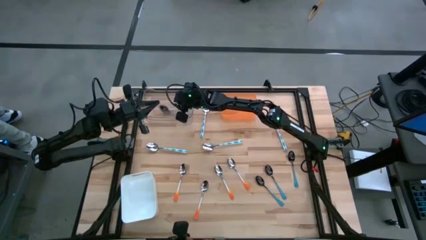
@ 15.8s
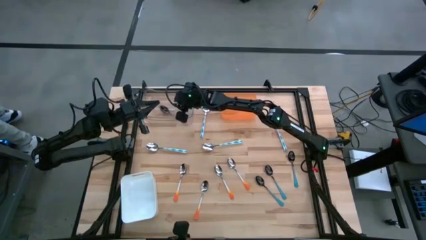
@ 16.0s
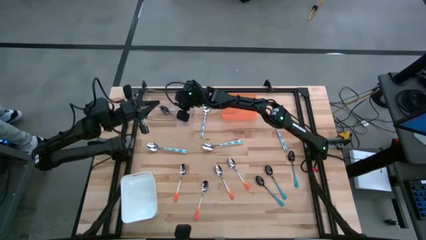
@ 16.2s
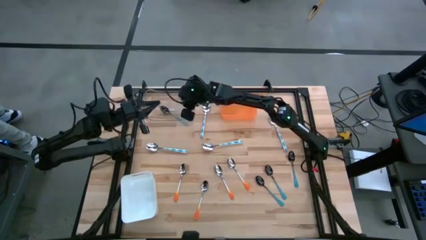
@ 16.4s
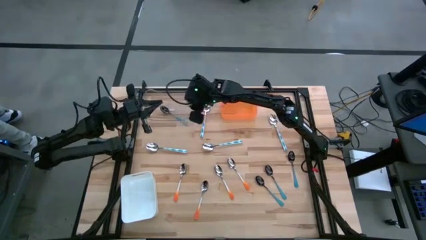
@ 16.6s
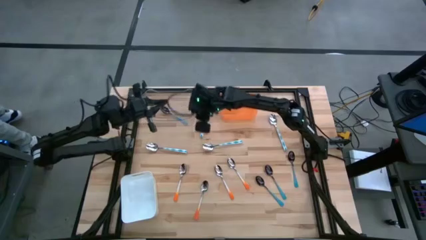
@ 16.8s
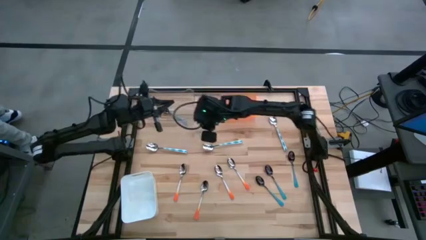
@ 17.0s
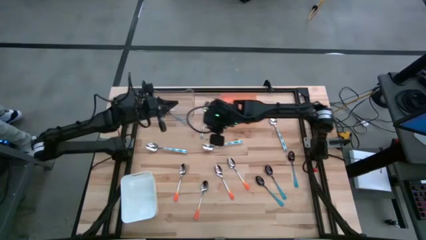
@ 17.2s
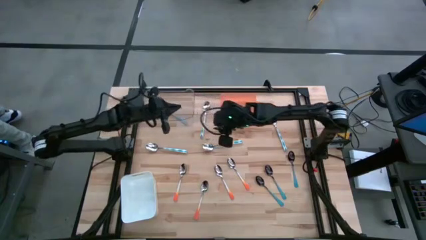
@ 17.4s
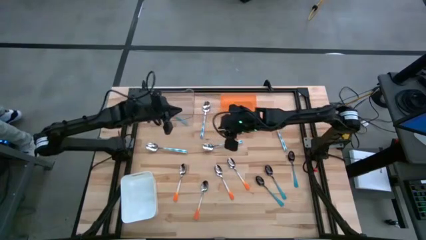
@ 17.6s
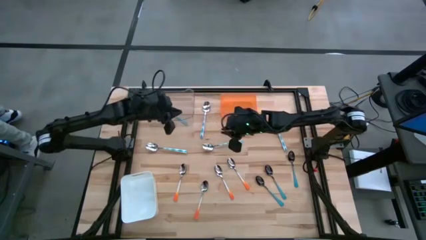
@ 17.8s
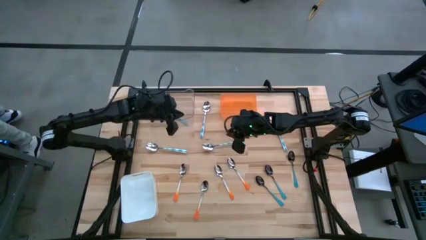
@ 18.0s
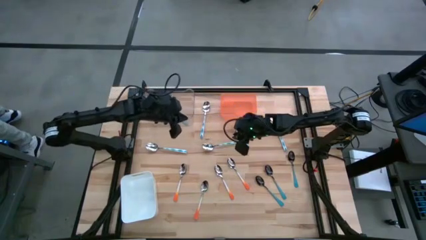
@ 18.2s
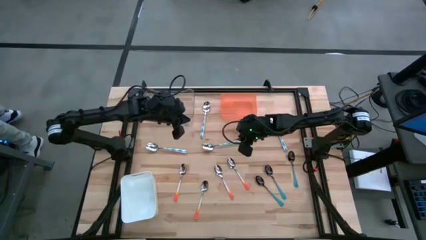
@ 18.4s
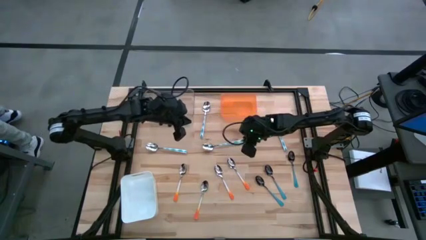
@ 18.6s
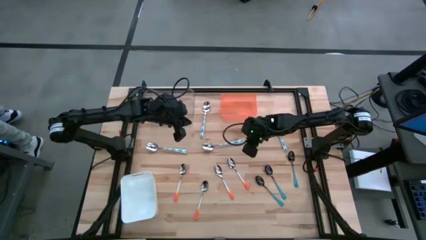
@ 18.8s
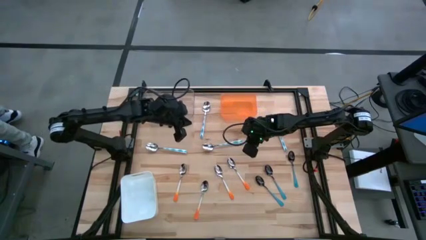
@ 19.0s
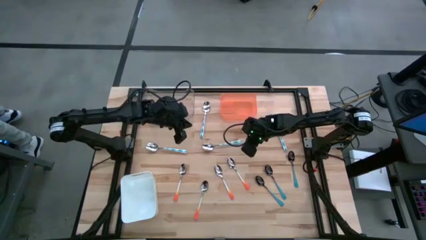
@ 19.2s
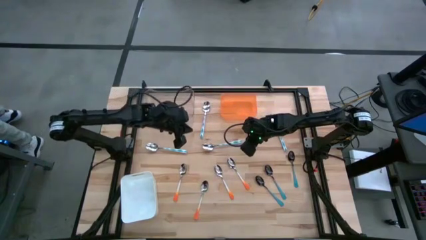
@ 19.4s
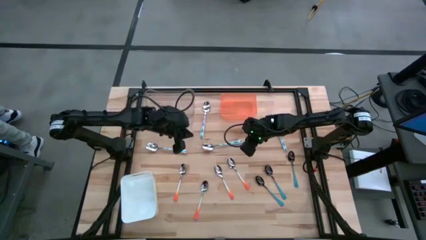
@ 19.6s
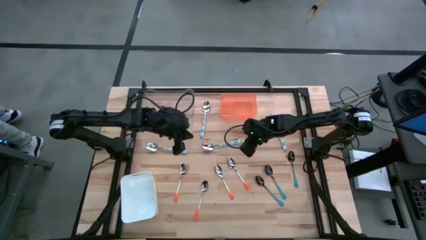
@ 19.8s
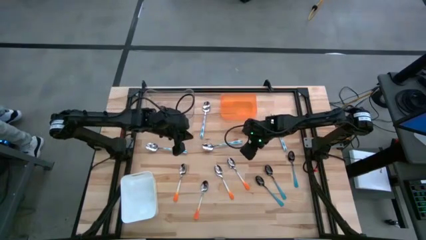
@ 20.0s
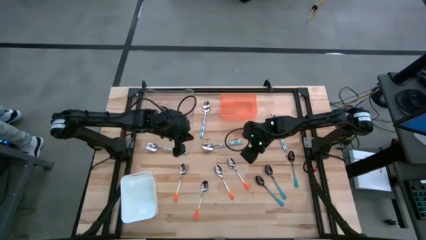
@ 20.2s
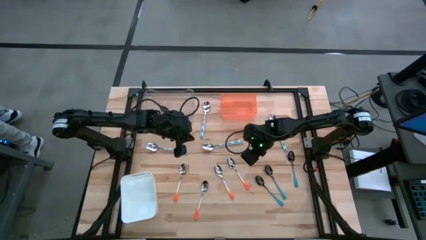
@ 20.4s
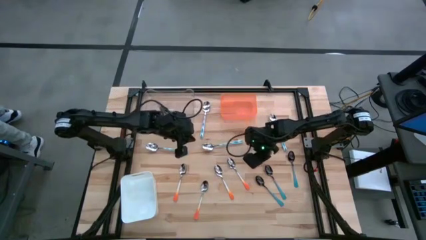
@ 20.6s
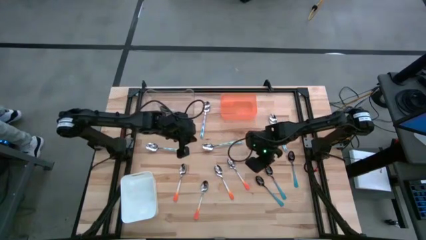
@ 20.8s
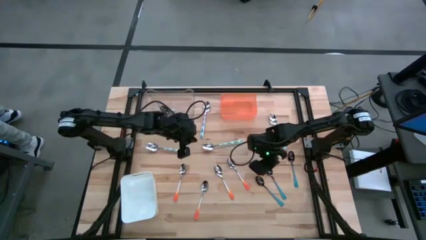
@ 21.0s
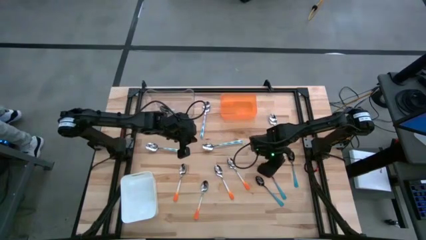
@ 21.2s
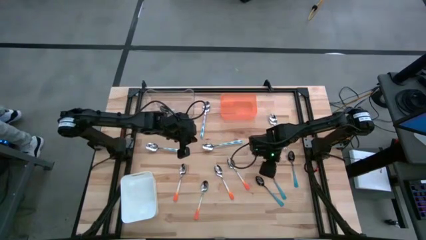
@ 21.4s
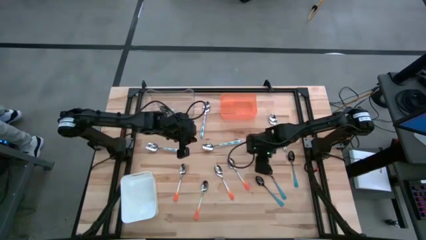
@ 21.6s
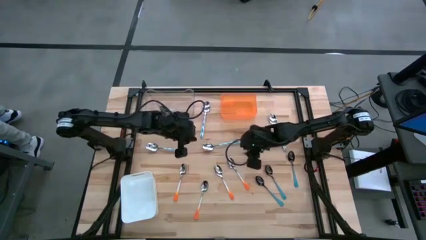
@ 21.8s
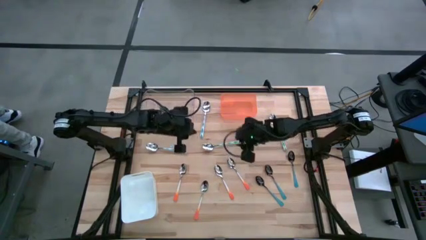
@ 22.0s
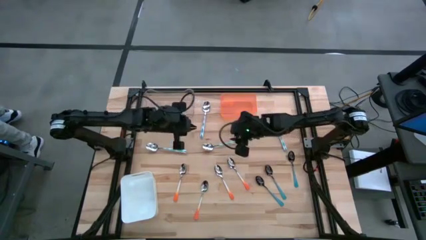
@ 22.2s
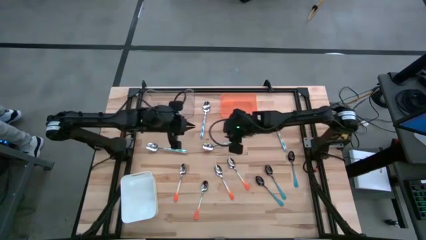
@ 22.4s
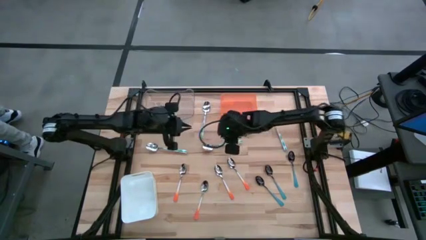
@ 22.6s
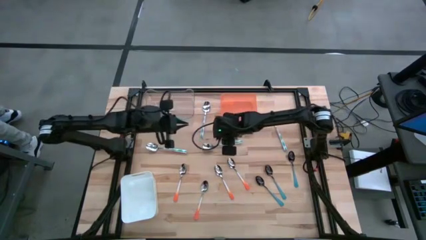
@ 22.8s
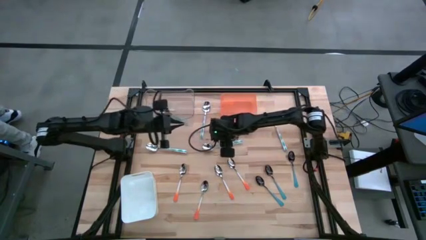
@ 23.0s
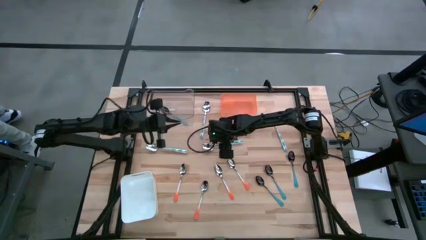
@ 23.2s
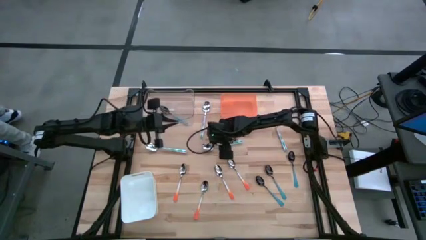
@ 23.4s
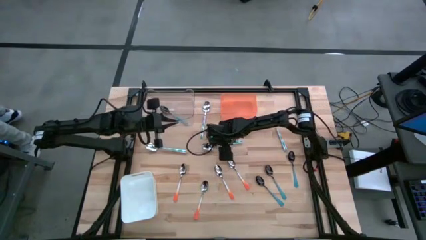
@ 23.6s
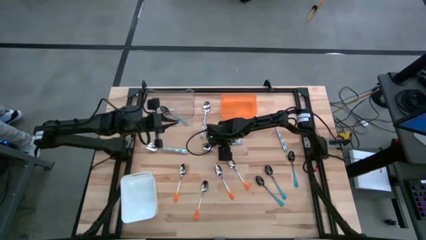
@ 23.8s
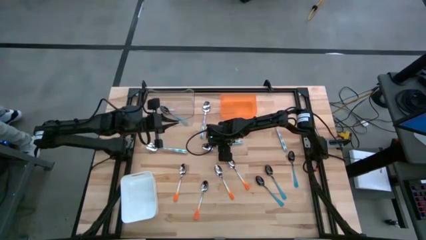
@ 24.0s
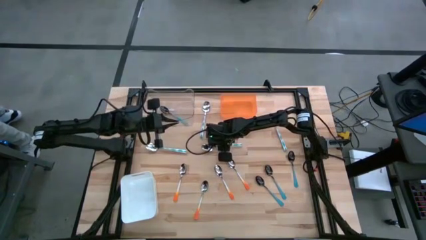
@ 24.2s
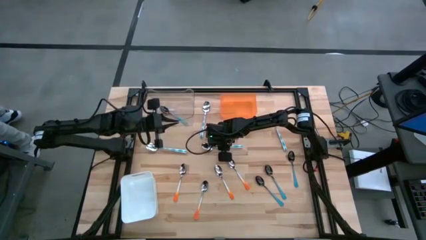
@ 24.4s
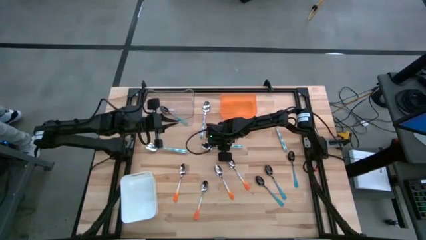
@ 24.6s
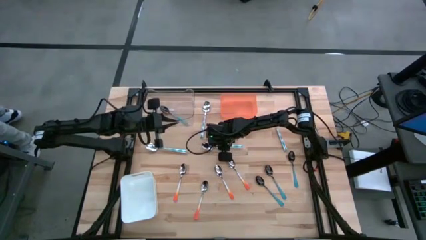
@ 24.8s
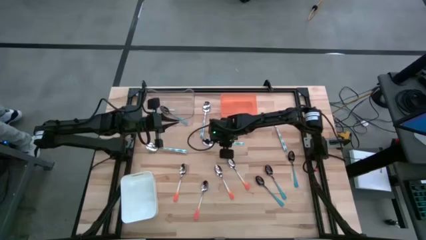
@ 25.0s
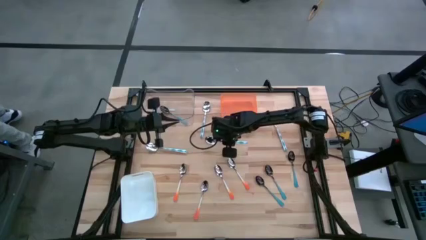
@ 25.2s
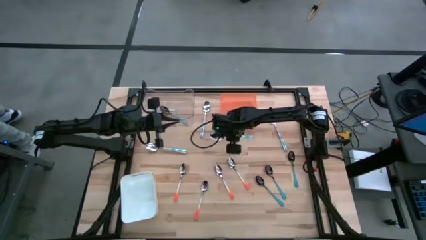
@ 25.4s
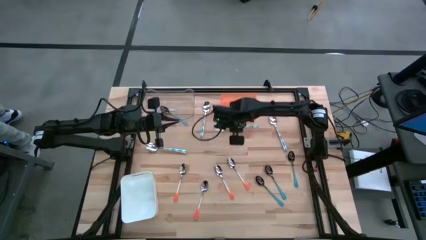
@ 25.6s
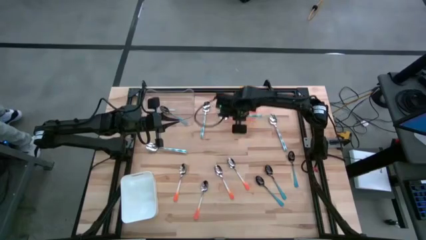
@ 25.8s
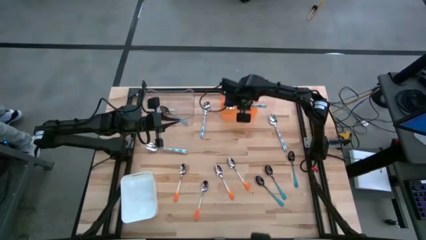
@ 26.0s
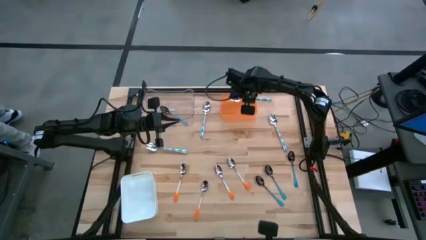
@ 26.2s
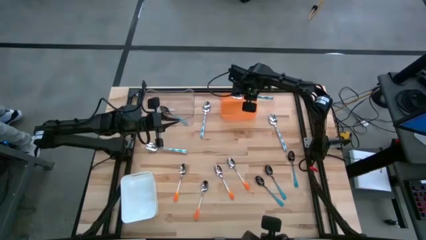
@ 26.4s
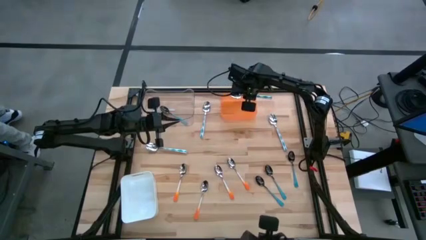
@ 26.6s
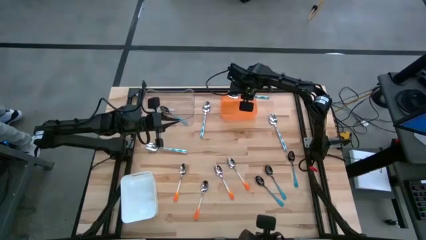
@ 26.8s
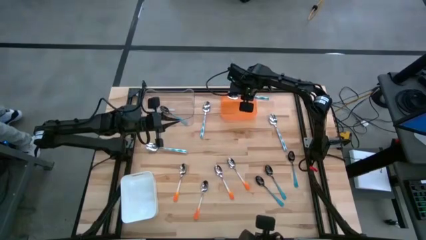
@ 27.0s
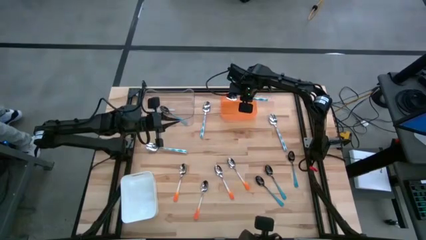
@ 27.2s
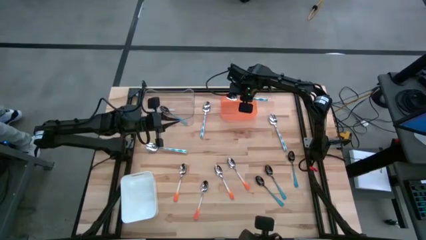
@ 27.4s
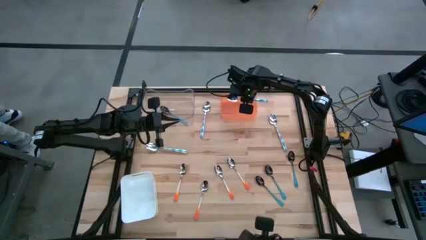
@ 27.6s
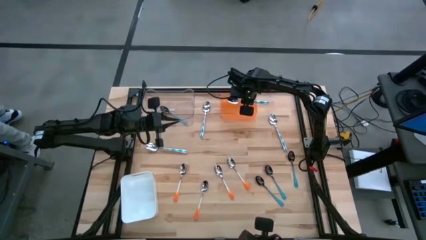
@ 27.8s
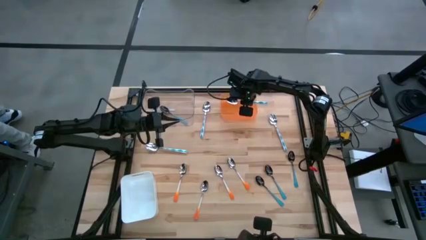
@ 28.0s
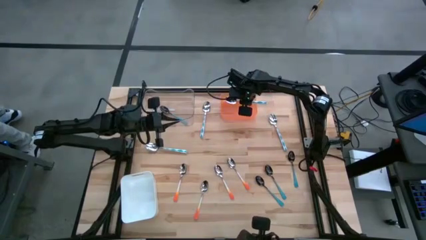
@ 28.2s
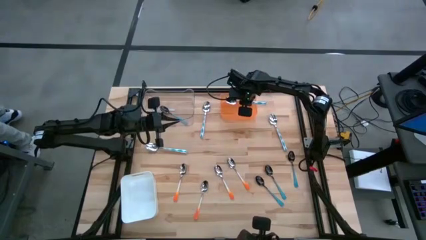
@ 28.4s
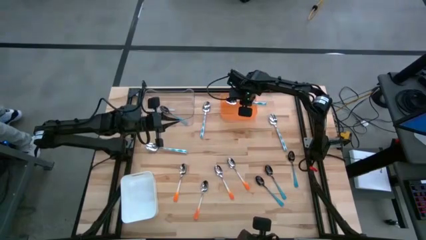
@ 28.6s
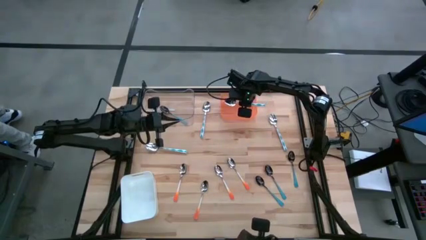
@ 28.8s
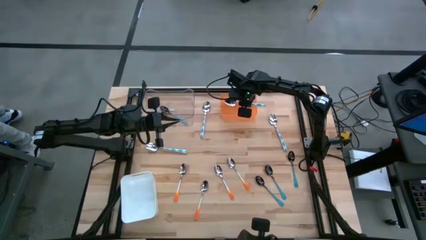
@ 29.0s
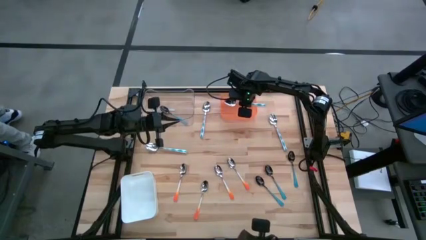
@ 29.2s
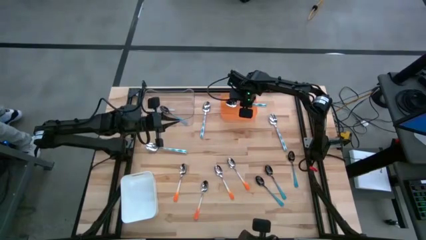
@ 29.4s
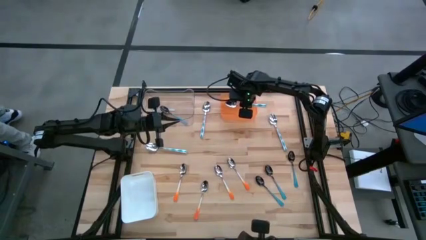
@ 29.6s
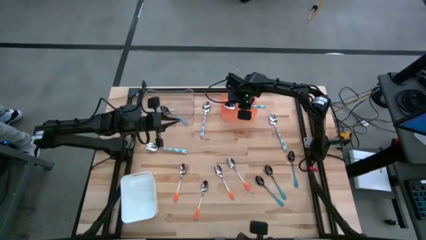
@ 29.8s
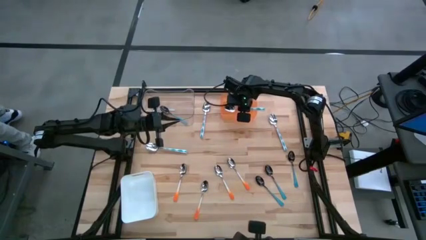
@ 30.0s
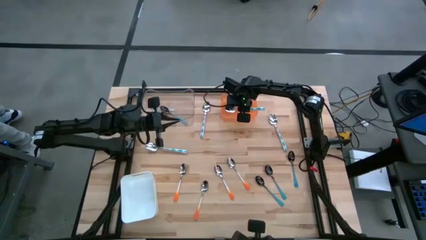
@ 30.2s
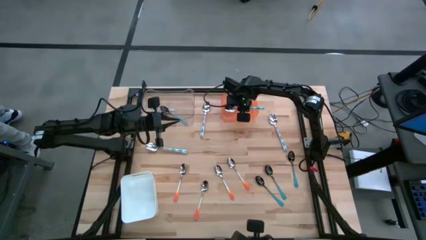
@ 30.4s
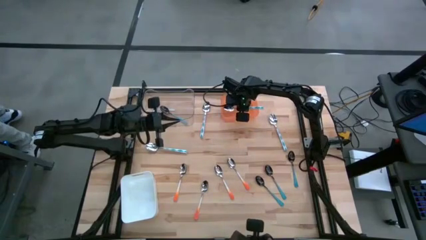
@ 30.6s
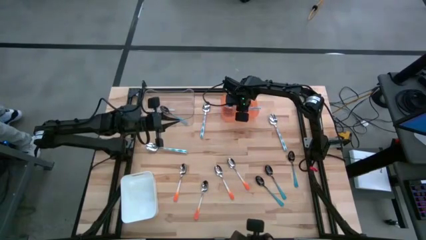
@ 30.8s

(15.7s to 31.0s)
Task: Sort silverware by color (type)
Put the light blue spoon into the orange bin
